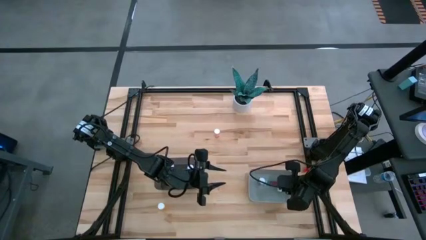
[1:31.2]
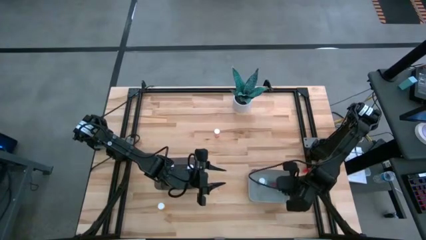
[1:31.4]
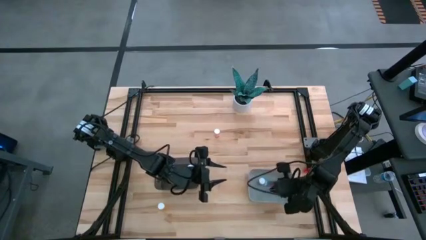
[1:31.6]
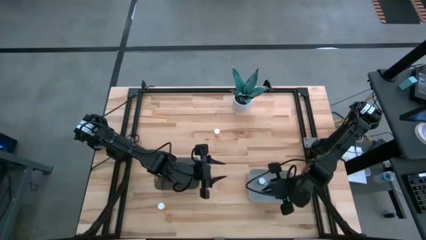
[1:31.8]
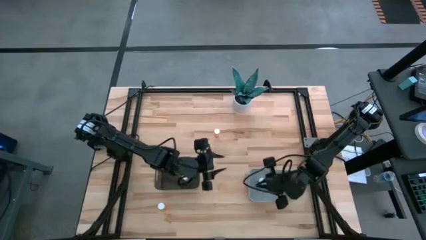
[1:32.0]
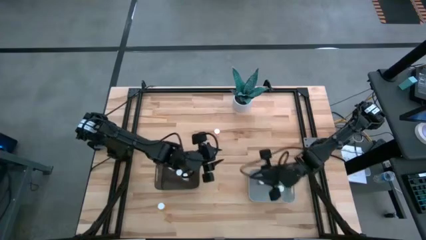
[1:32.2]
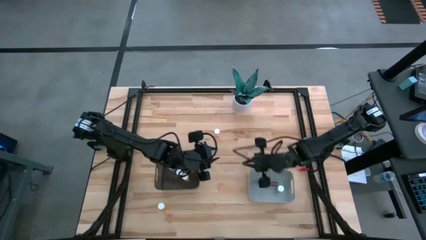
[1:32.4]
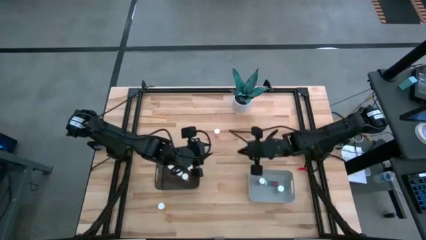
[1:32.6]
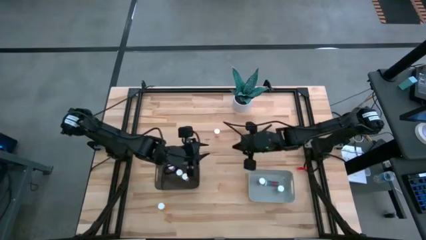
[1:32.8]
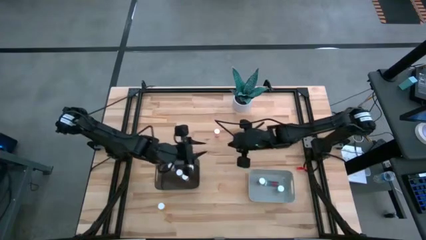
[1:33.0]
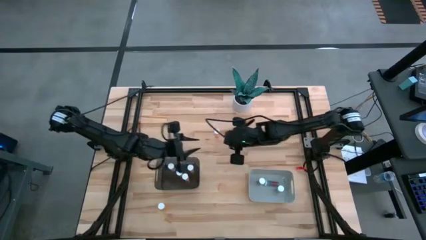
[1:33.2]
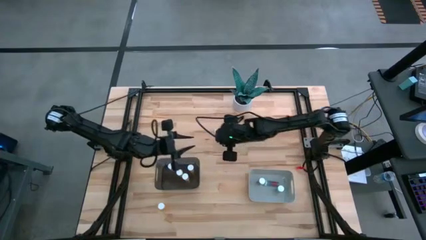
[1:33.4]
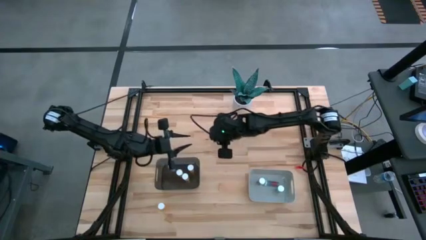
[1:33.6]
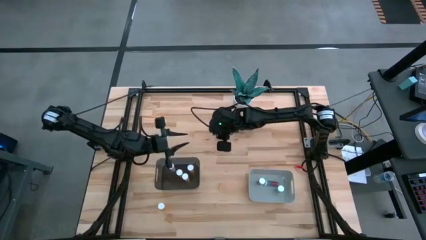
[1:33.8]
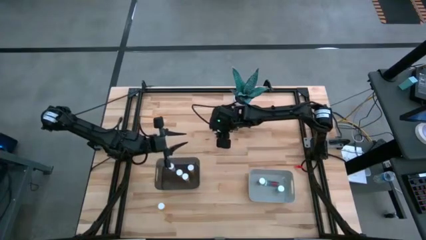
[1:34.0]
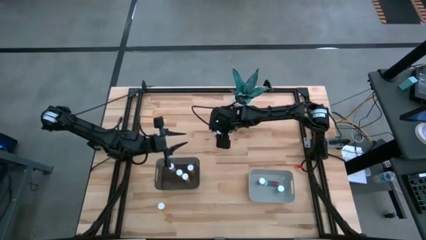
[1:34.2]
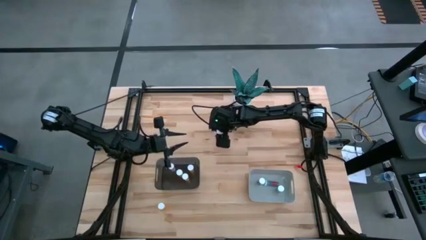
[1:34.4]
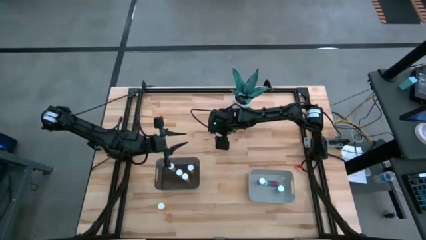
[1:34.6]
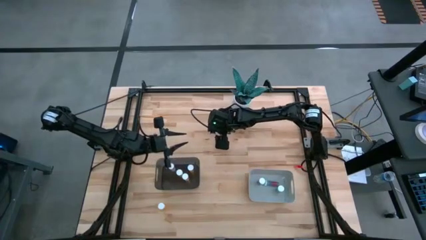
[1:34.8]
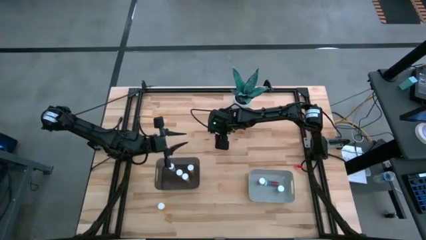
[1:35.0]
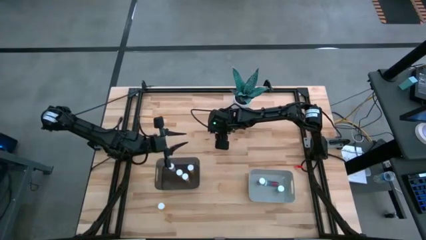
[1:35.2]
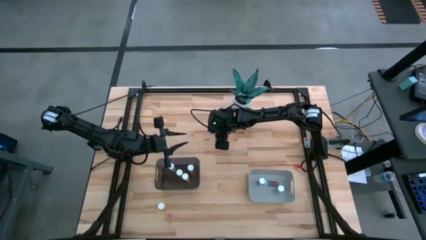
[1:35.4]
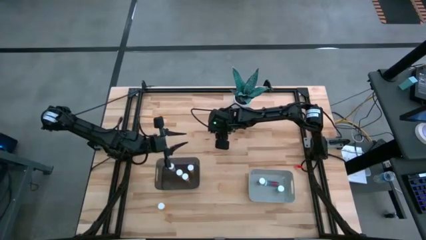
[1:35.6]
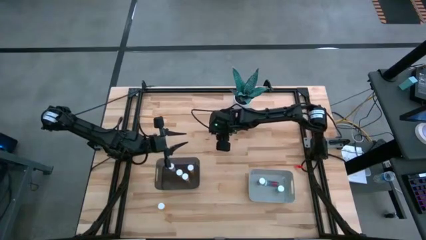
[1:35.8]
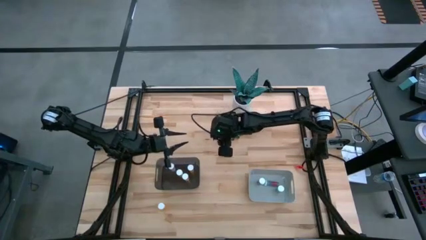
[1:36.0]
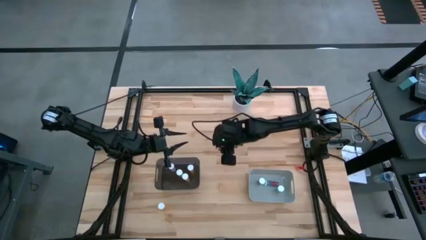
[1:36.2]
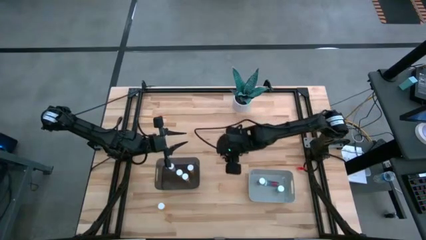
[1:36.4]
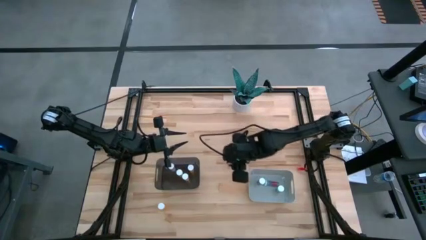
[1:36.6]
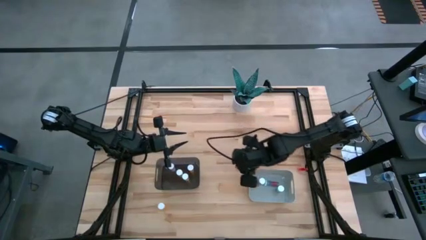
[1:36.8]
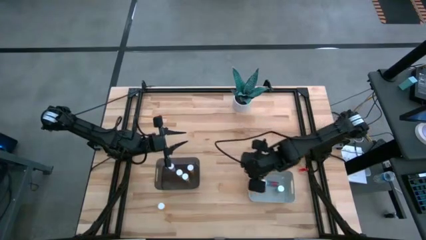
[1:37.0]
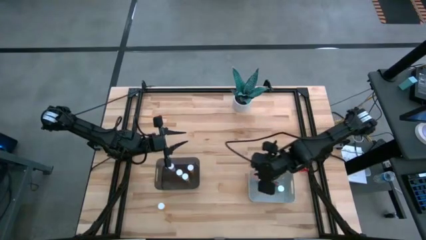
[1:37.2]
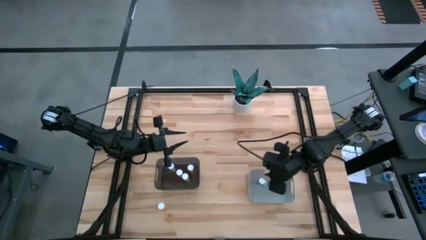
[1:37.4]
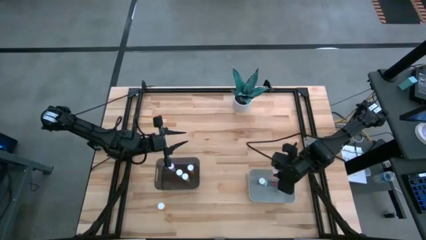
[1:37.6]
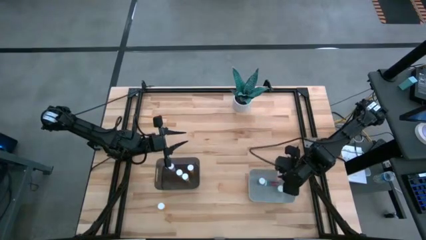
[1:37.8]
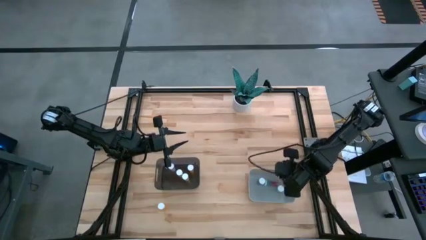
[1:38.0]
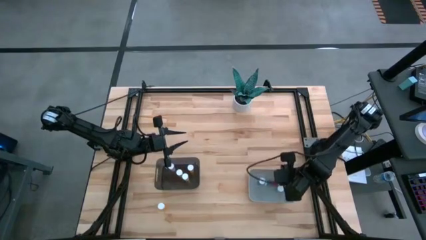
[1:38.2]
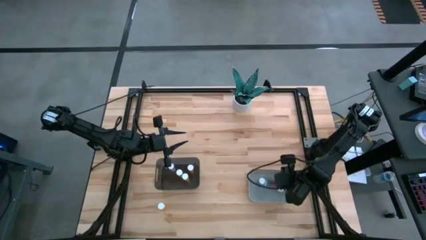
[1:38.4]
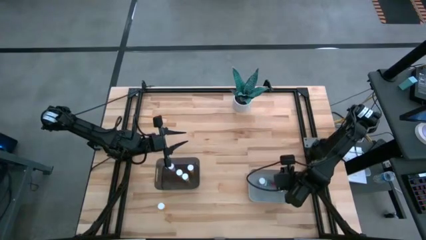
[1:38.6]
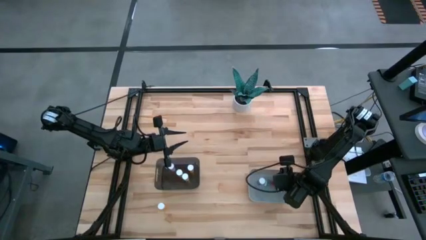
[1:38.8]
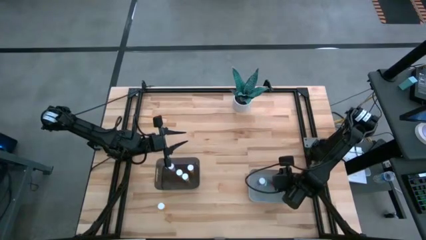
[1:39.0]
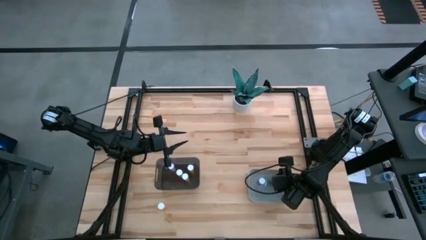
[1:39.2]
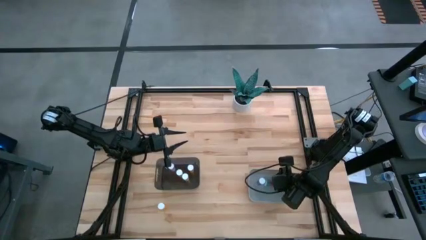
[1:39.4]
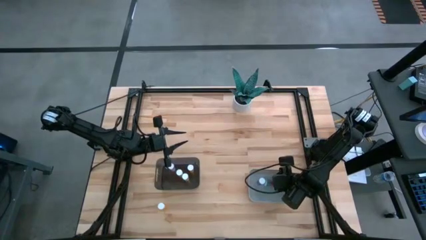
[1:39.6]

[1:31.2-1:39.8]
Task: Pick and place medicine bottles into bin by pill shape (circle, oval)
Put the pink capsule bottle into the gray bin

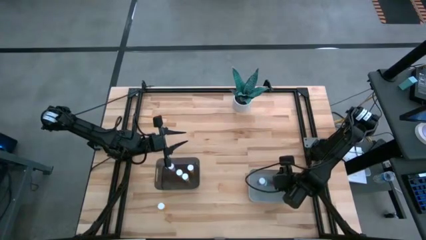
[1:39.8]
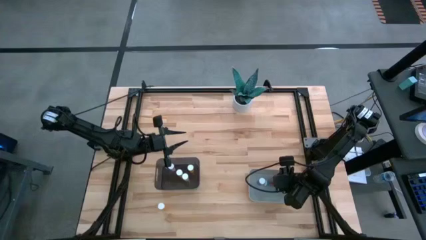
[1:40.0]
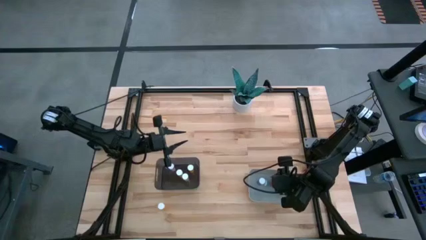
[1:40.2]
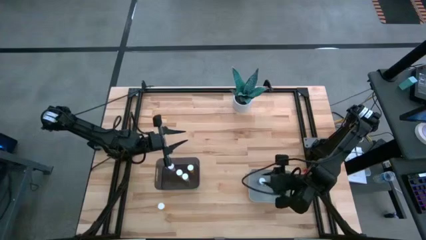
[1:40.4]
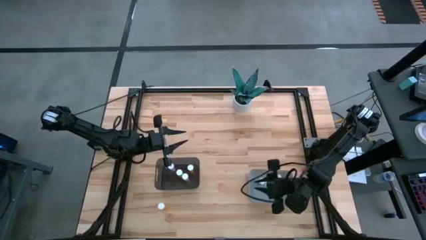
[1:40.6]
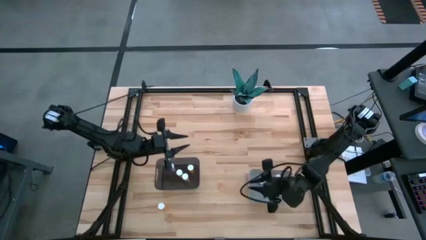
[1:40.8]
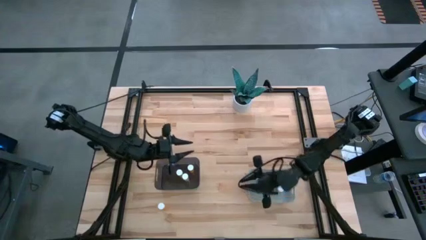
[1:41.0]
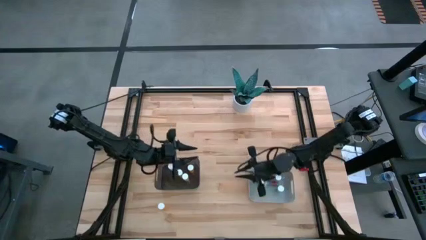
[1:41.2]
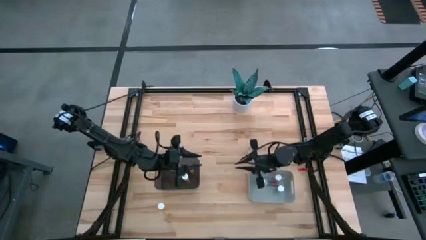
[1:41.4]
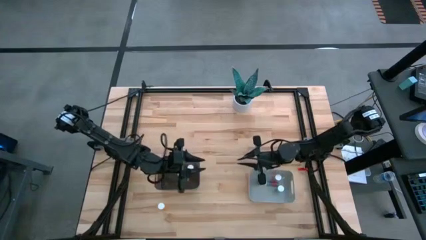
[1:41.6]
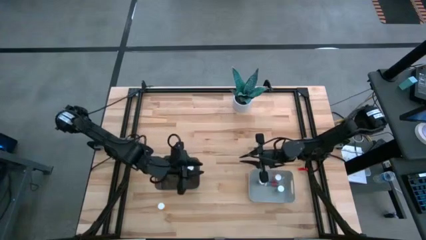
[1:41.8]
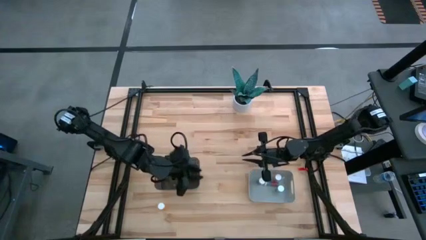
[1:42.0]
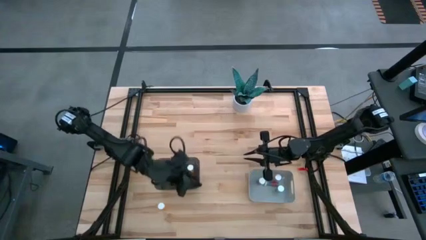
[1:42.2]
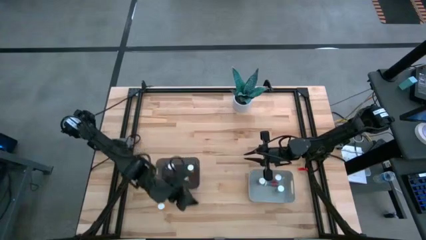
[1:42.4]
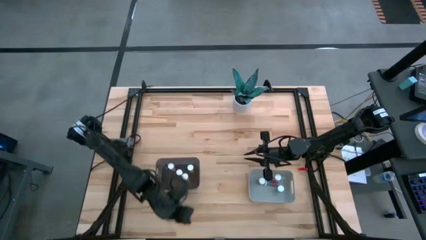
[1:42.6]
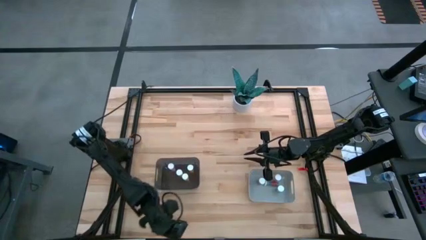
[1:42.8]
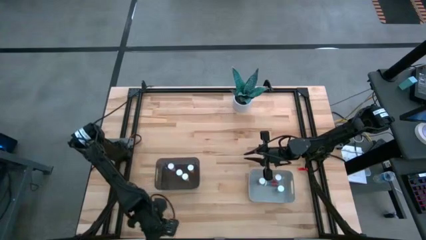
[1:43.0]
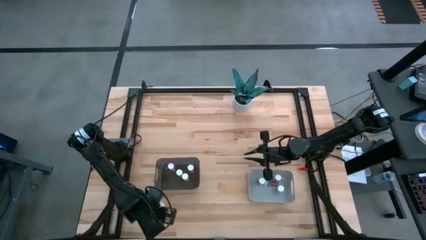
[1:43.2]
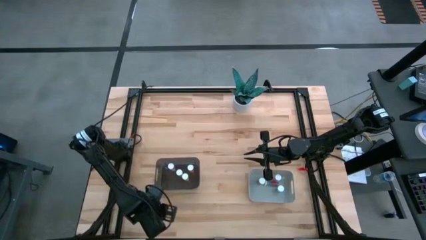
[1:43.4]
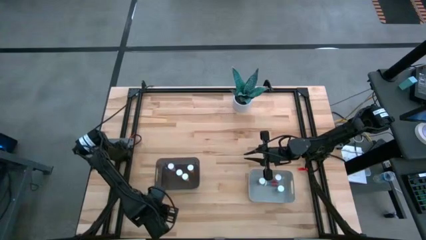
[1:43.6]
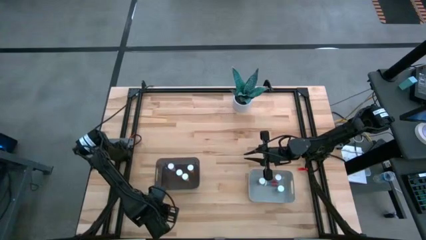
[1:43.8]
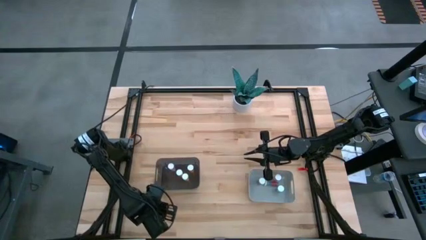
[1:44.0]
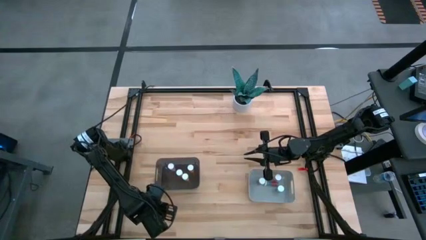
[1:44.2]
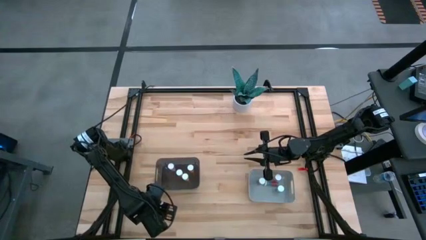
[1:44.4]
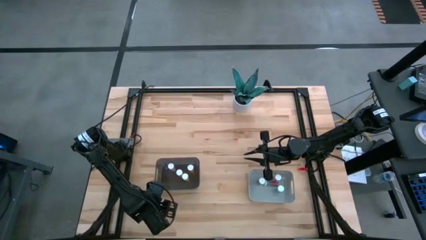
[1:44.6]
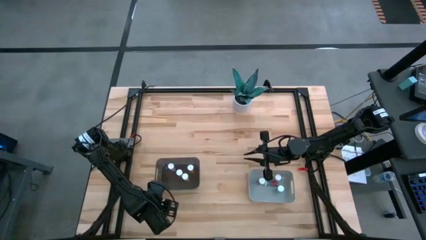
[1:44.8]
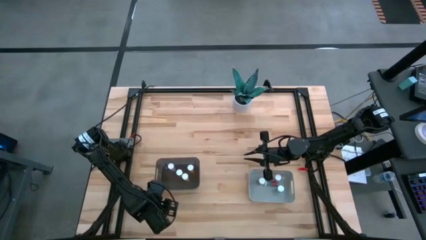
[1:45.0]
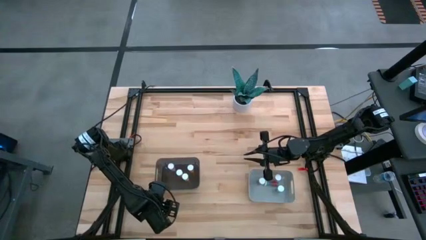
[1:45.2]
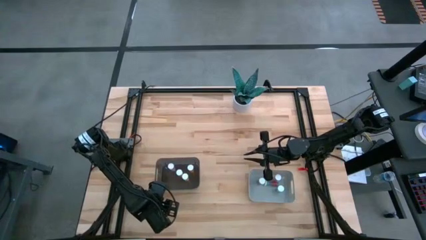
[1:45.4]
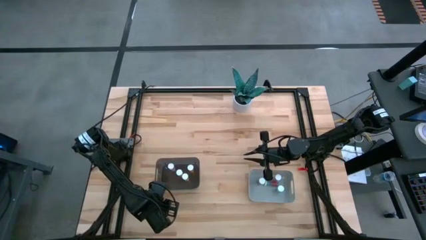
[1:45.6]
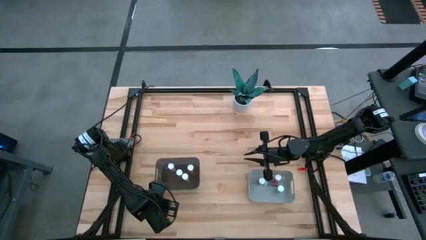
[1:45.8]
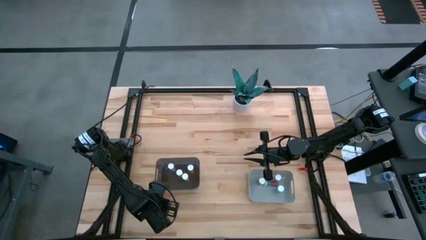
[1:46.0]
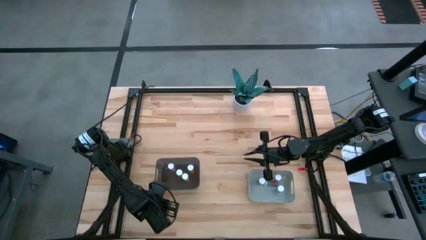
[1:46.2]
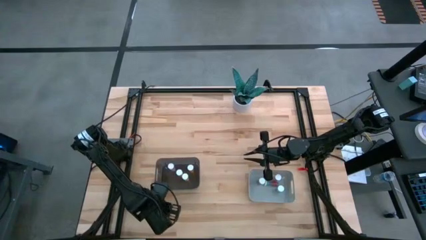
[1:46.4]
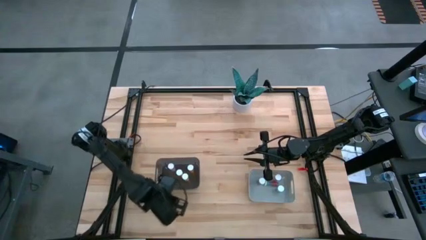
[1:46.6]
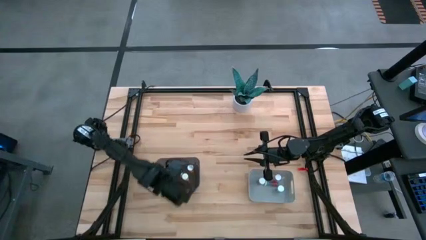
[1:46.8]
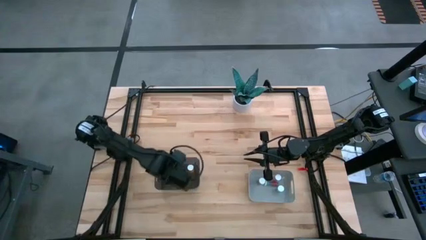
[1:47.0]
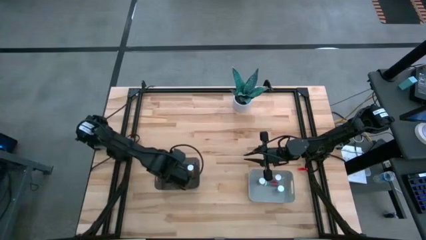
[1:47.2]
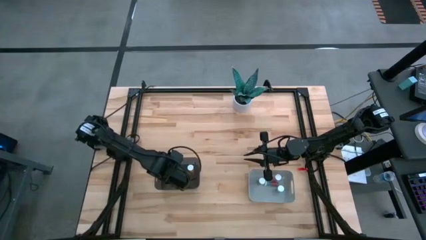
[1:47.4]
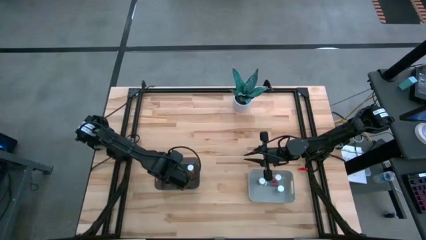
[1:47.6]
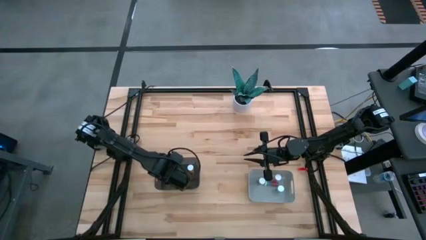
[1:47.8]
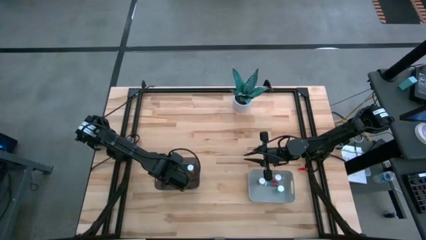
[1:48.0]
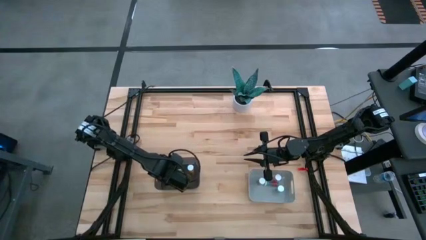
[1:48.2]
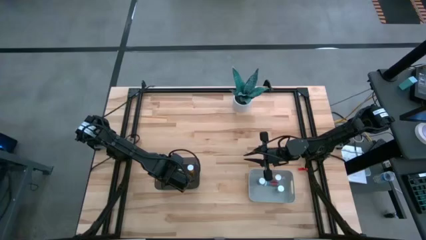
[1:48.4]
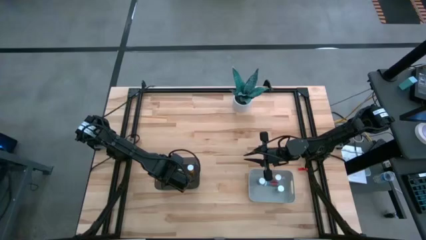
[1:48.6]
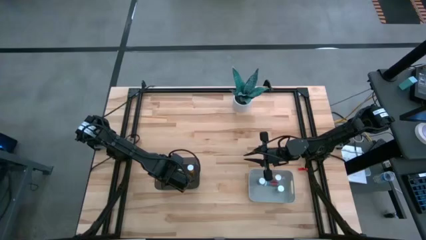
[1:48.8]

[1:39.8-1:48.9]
Put the orange tablet bottle into the black bin
